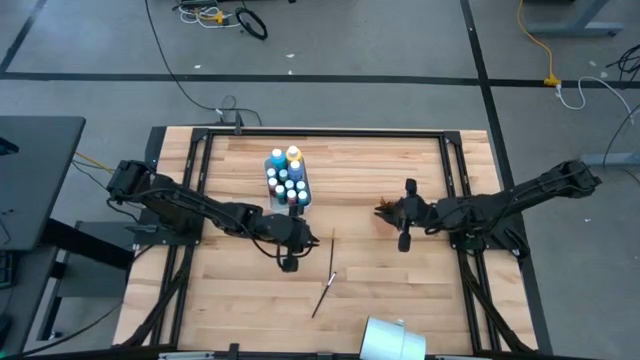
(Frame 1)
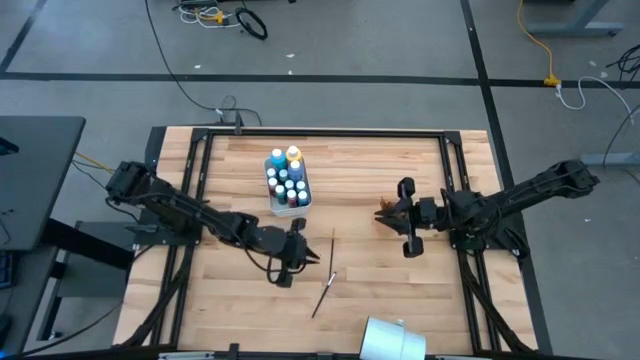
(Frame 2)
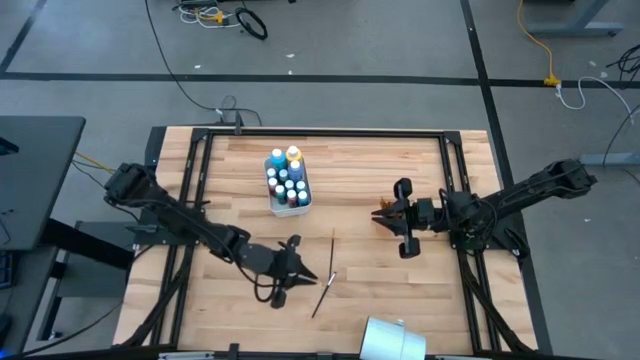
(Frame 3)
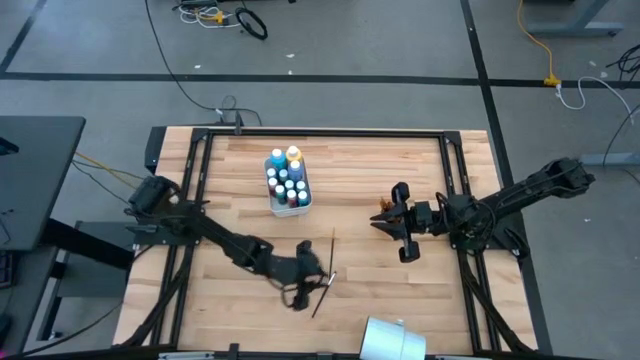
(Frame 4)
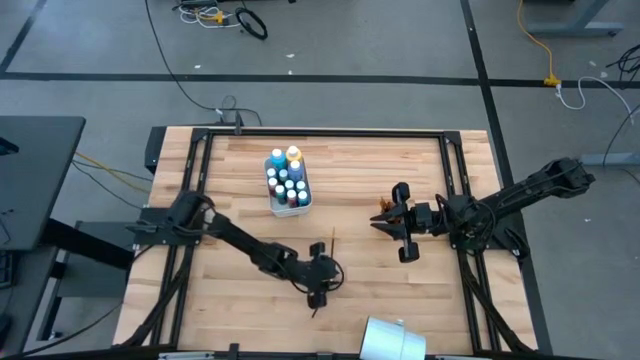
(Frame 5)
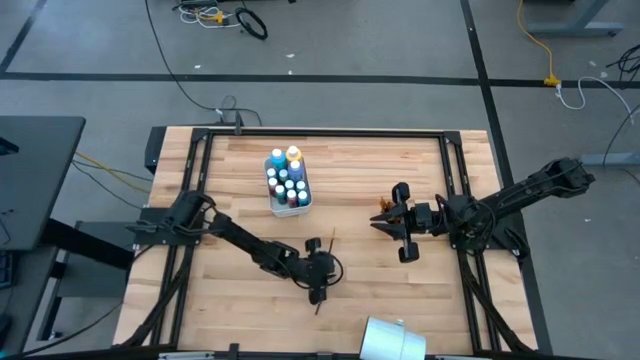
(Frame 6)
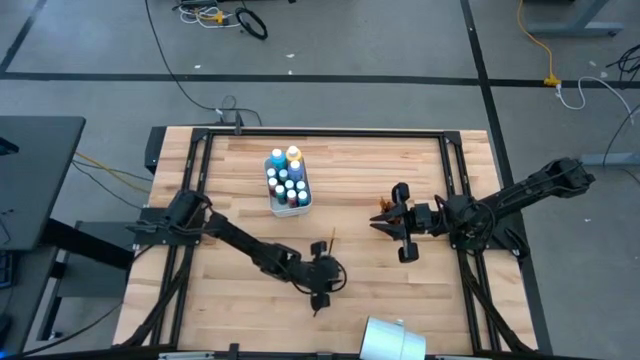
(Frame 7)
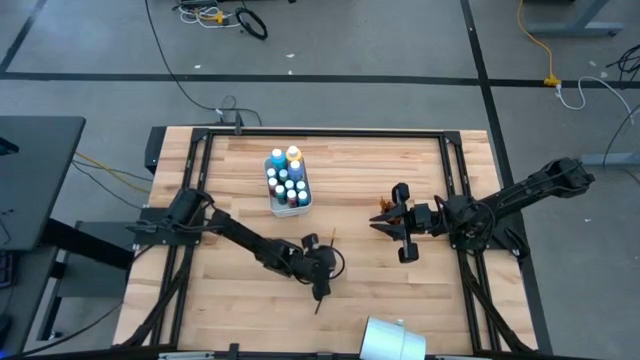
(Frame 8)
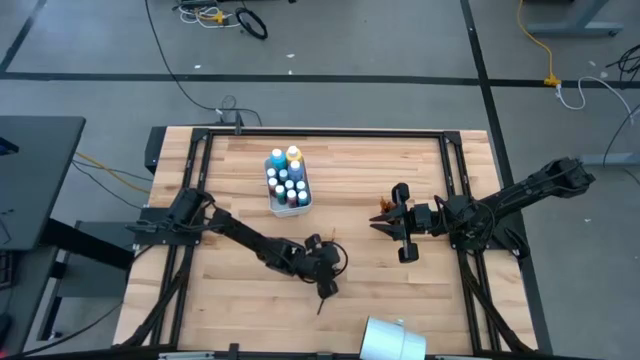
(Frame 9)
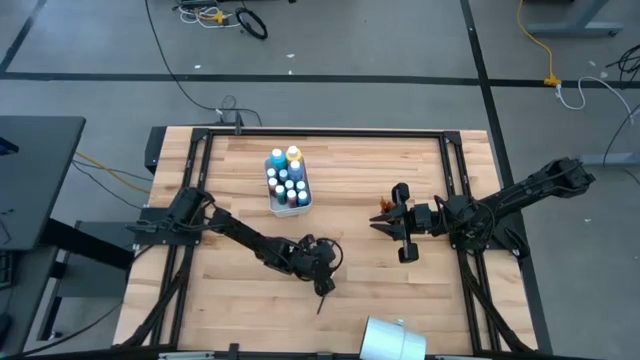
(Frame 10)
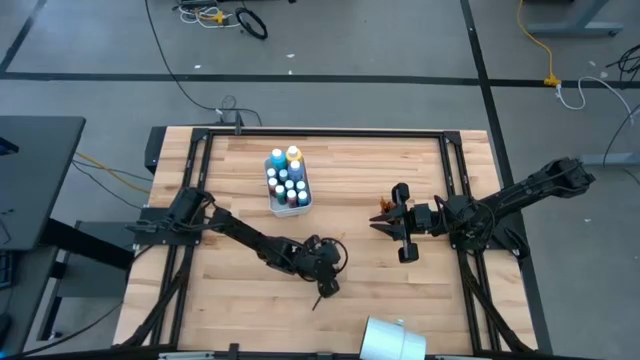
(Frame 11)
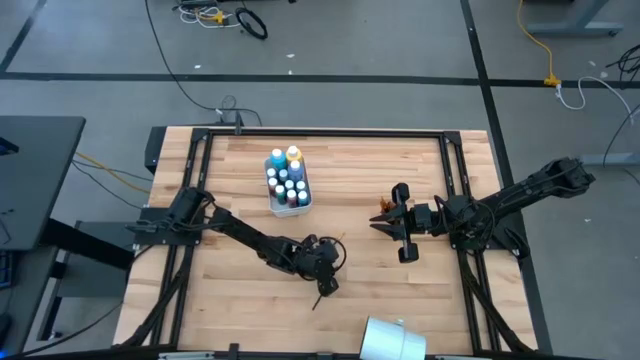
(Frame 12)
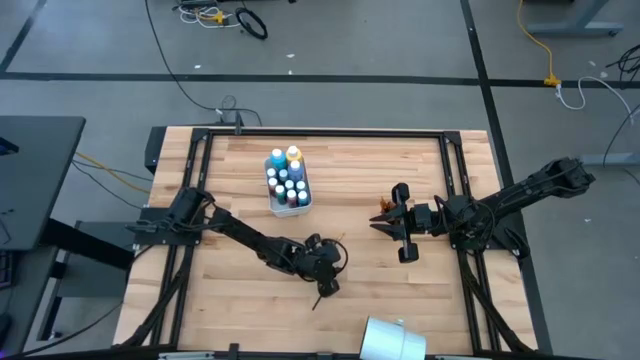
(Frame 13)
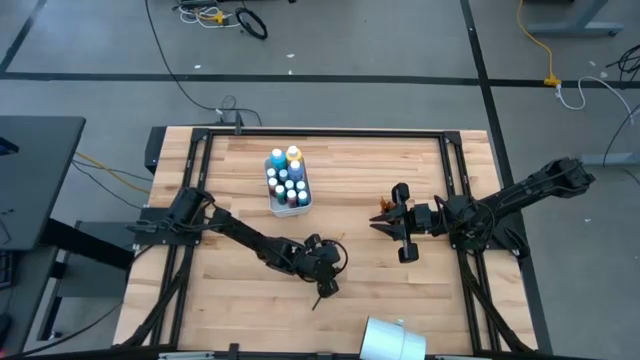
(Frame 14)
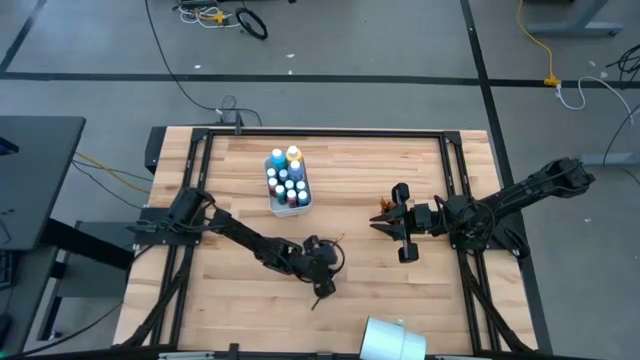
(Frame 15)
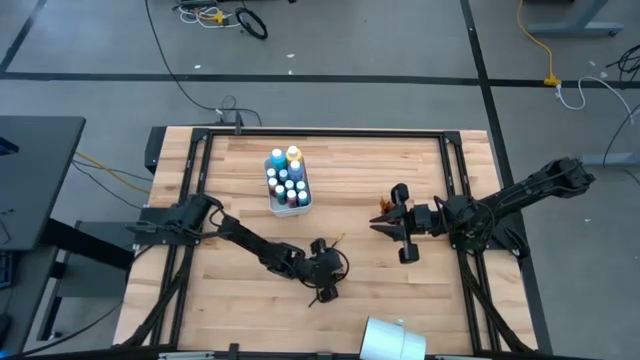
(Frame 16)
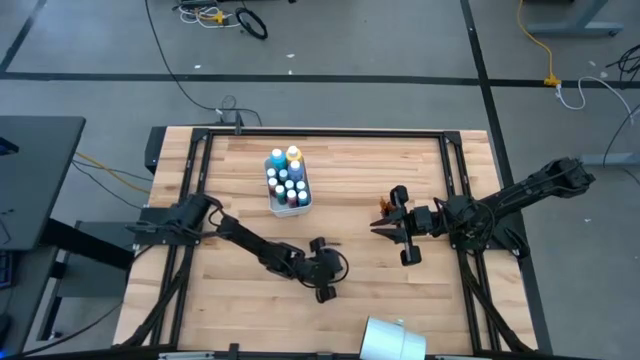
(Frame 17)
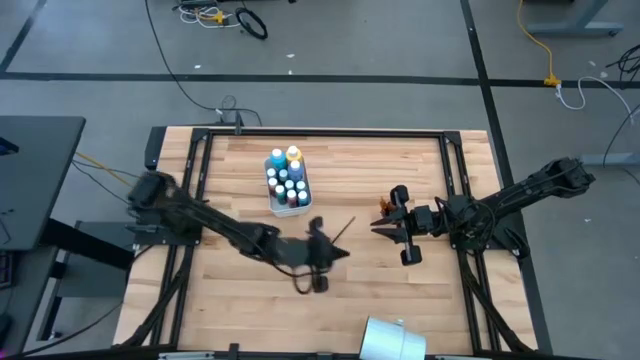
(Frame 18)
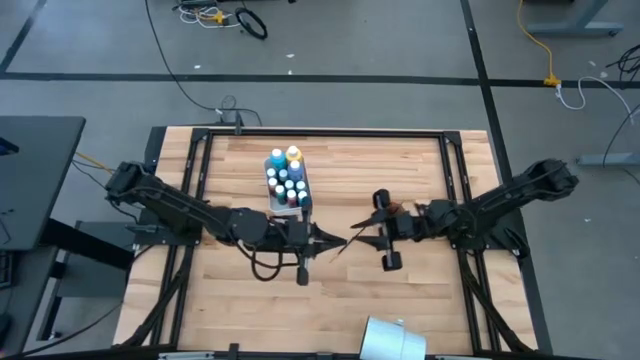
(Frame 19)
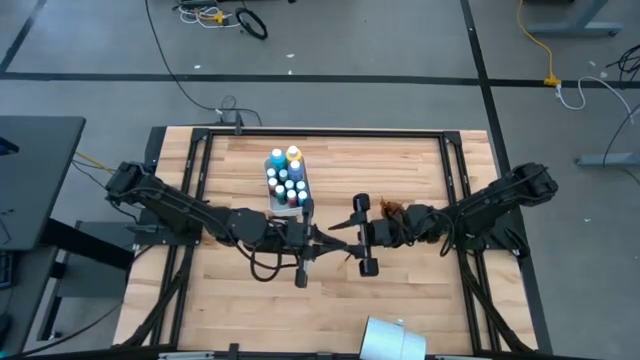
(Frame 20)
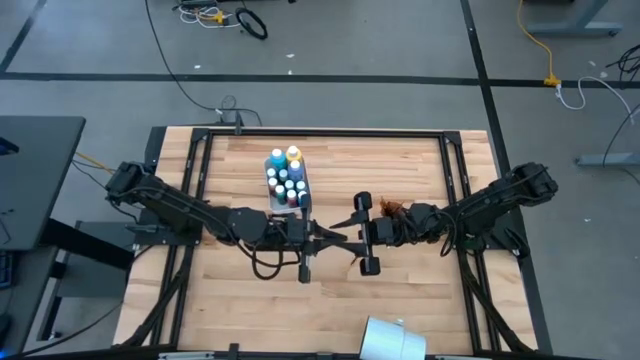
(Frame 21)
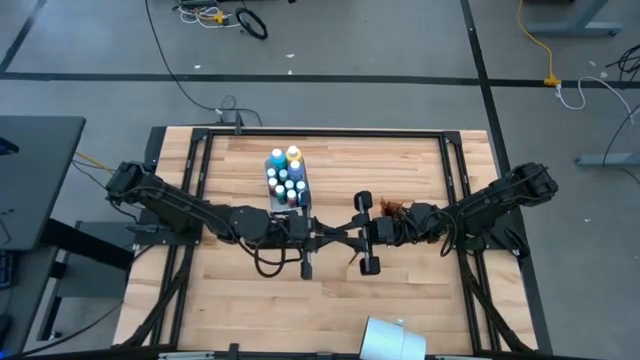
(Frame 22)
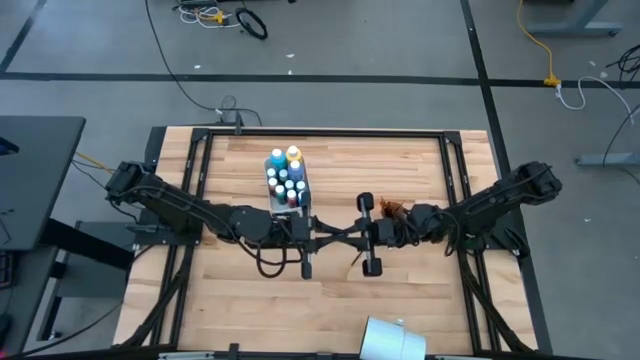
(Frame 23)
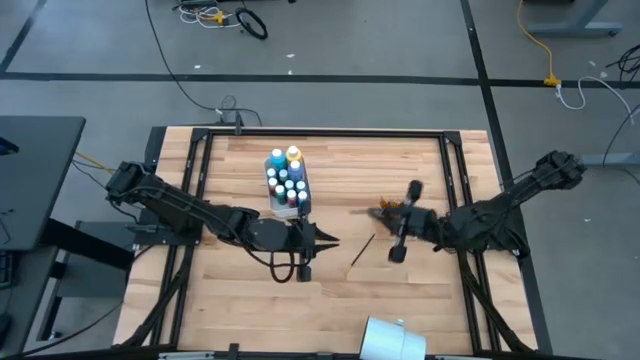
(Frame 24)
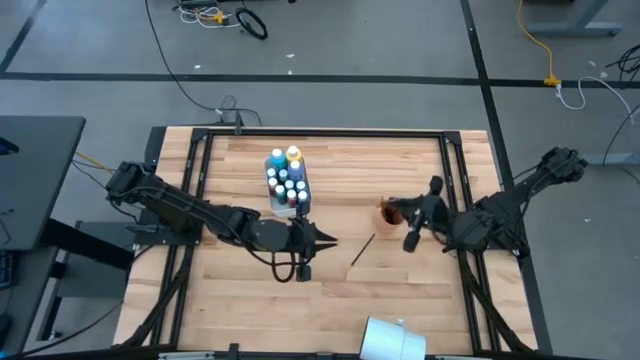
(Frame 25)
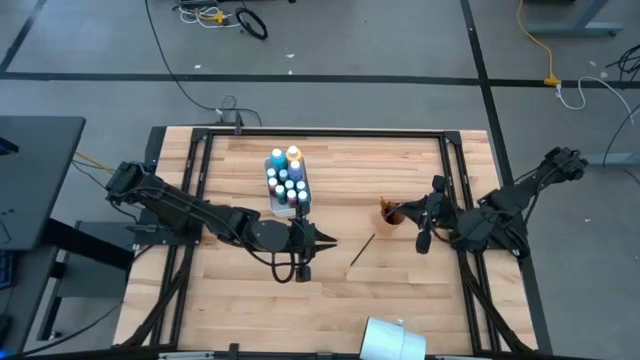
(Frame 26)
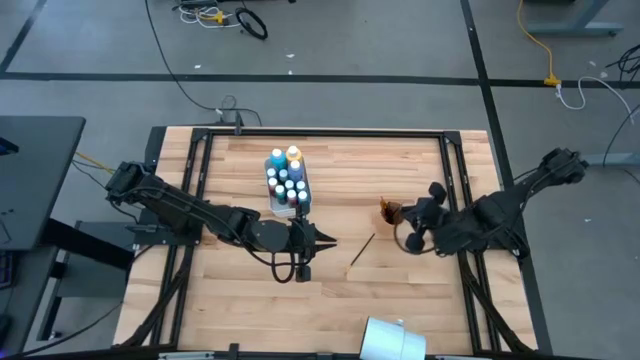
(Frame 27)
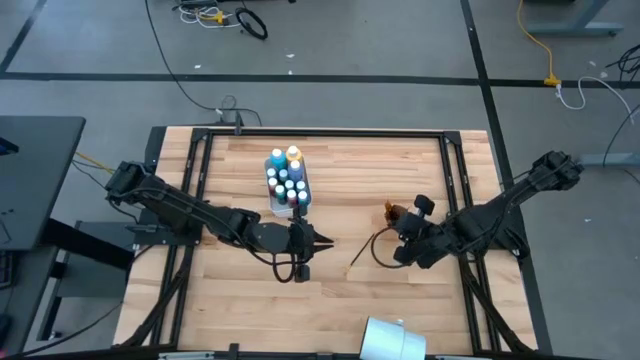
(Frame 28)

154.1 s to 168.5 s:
Task: Pick & Place Paint Supplies
Put the silver paint brush into the orange cup

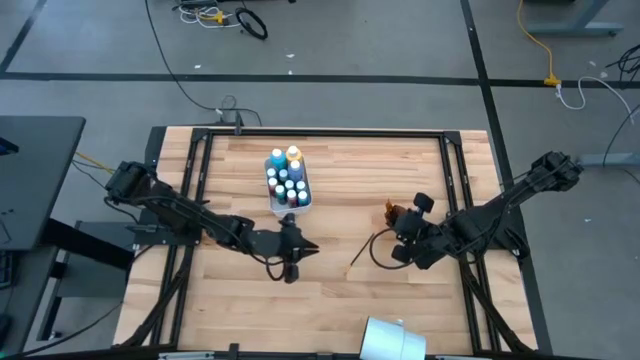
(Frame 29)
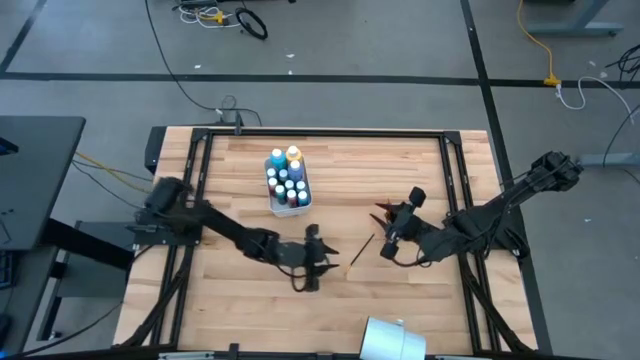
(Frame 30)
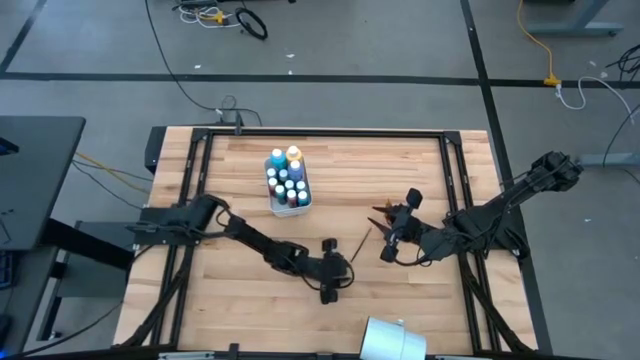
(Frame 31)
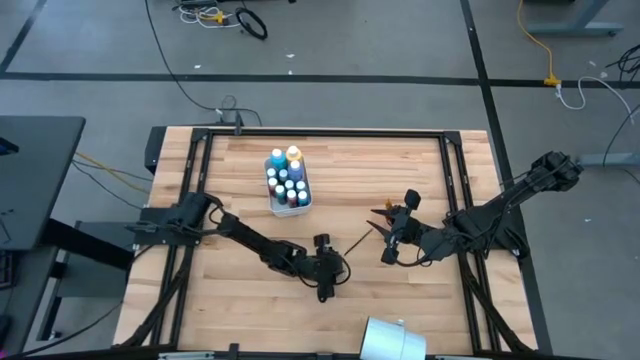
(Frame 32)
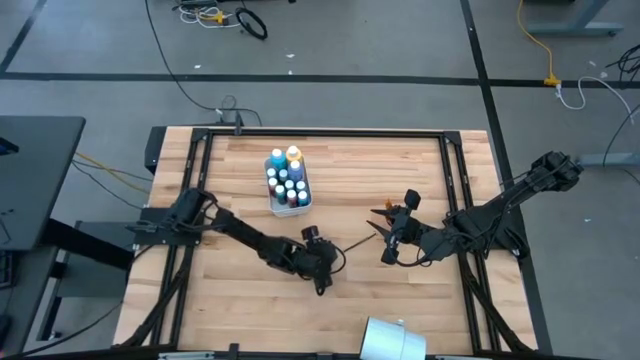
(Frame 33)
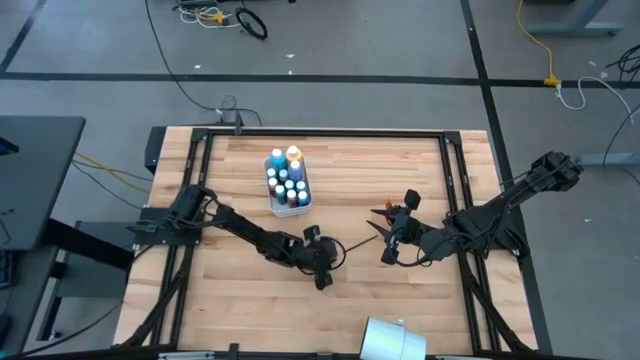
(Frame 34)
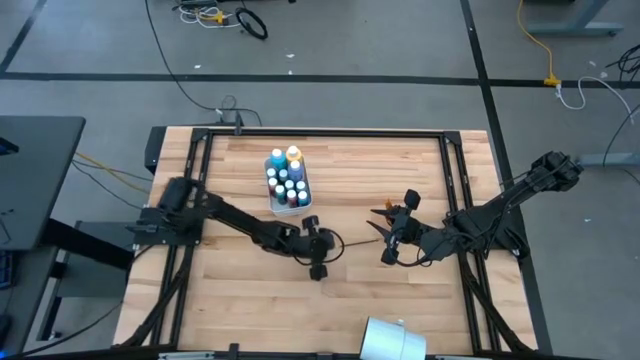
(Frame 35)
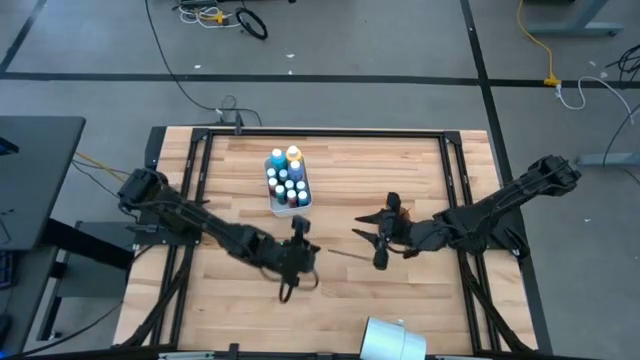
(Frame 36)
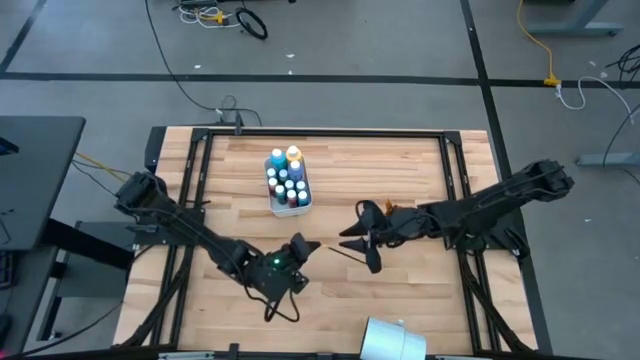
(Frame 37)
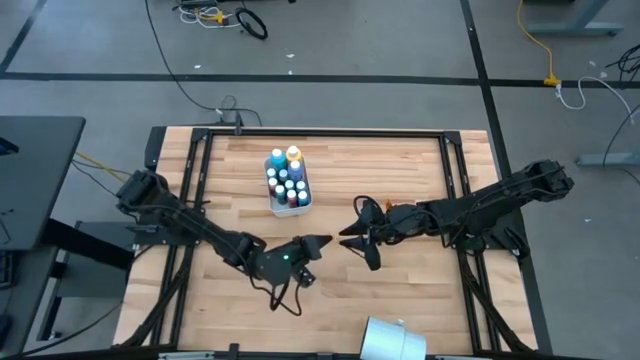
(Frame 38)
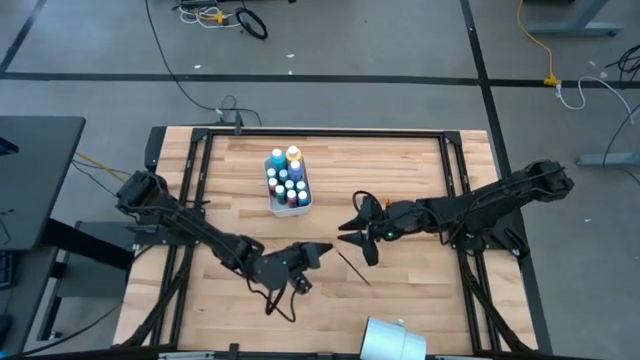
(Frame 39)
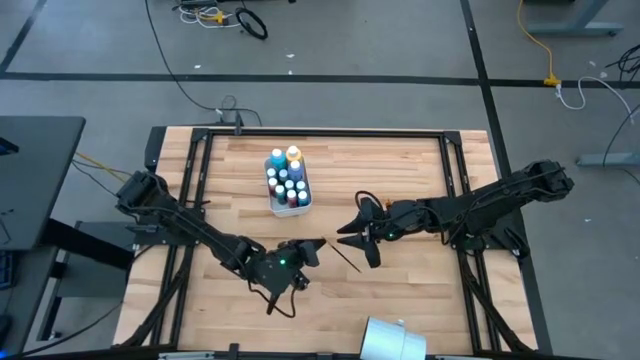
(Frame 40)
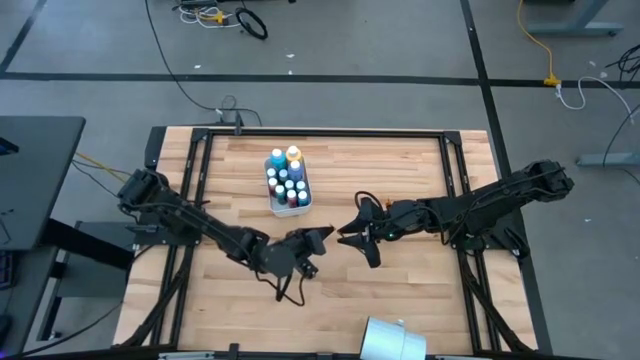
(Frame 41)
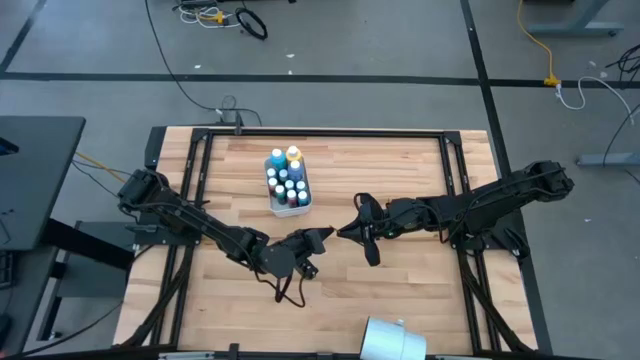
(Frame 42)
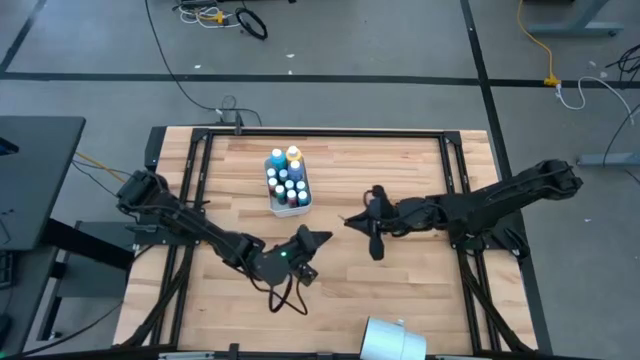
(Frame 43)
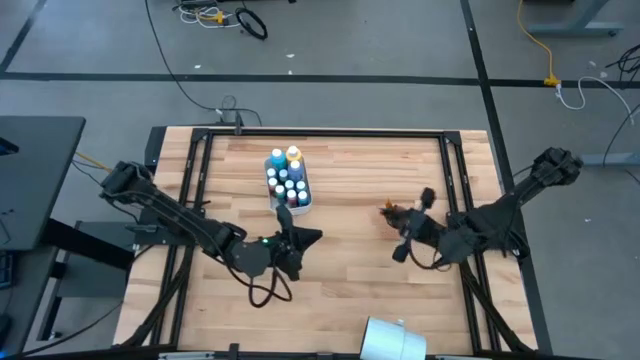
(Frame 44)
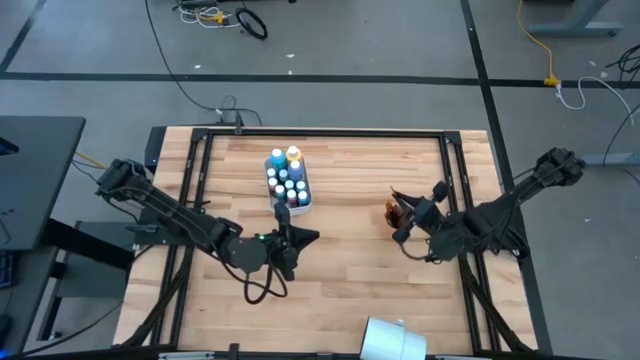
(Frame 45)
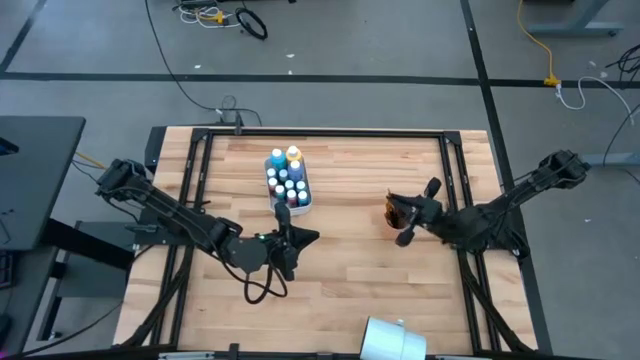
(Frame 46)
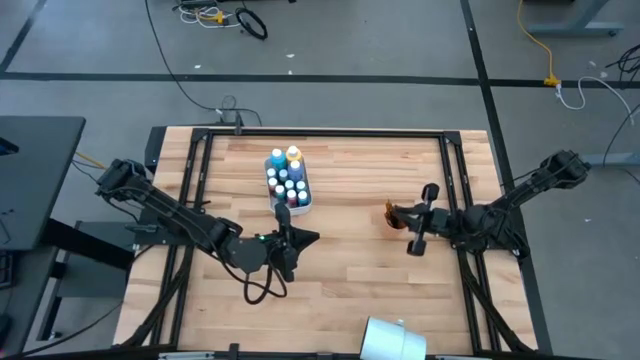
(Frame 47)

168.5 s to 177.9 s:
Put the gold paint brush into the orange cup
